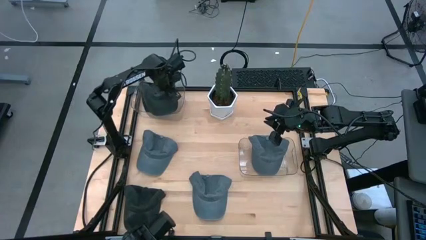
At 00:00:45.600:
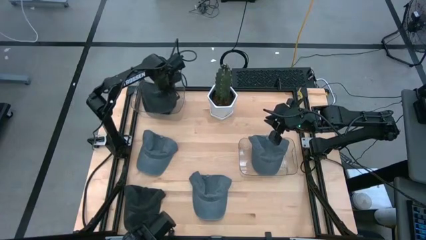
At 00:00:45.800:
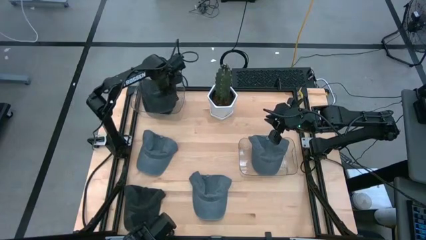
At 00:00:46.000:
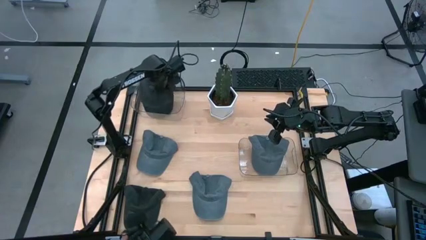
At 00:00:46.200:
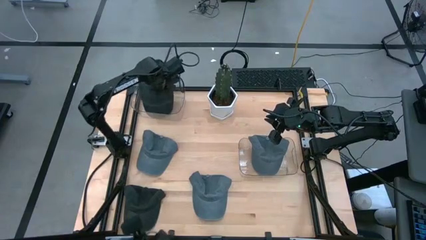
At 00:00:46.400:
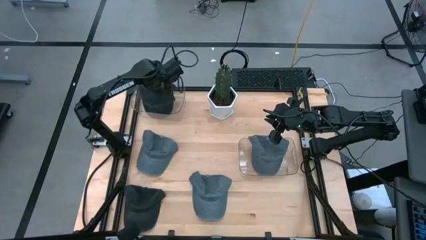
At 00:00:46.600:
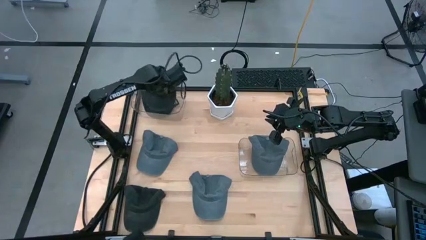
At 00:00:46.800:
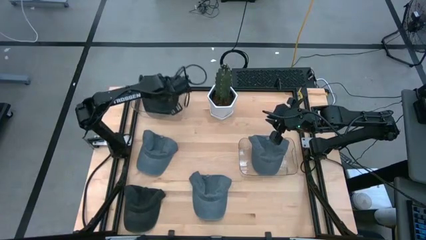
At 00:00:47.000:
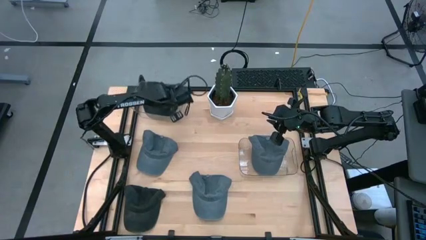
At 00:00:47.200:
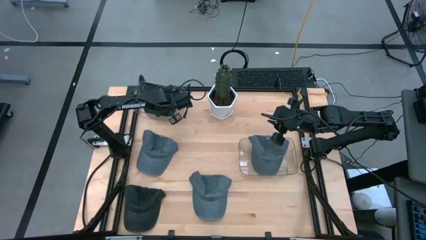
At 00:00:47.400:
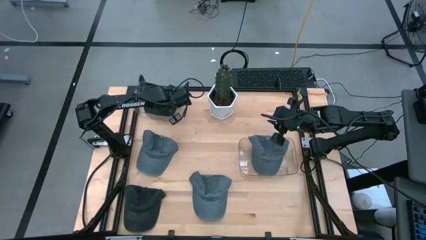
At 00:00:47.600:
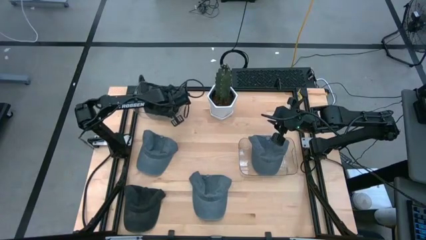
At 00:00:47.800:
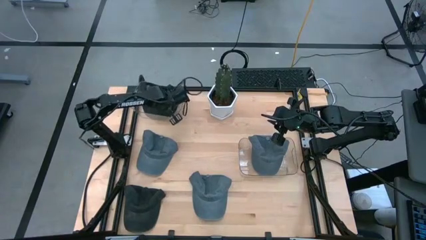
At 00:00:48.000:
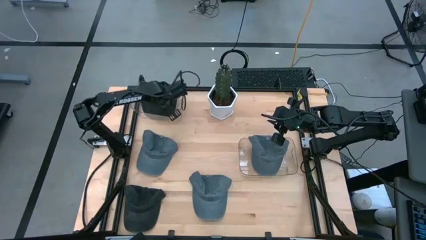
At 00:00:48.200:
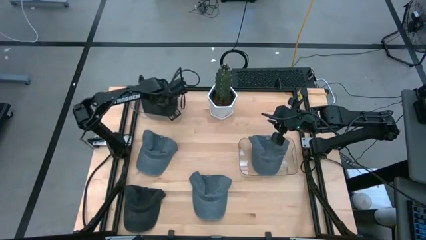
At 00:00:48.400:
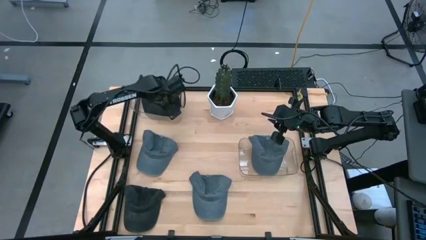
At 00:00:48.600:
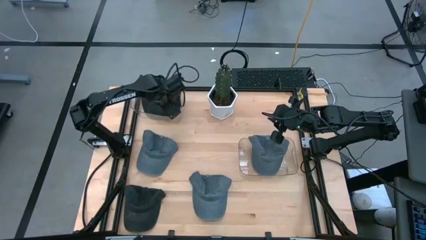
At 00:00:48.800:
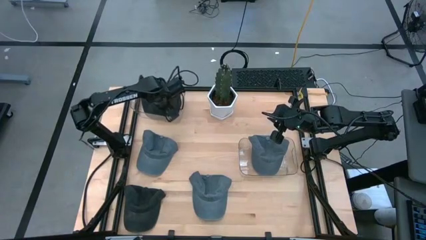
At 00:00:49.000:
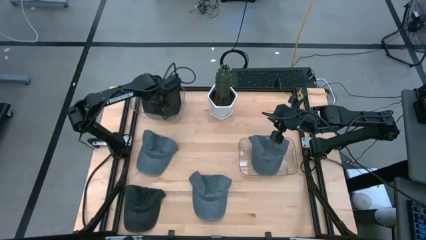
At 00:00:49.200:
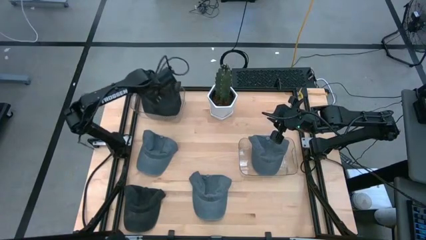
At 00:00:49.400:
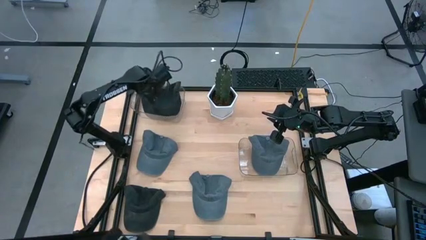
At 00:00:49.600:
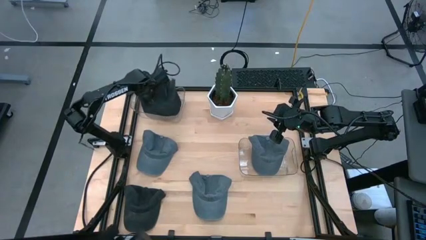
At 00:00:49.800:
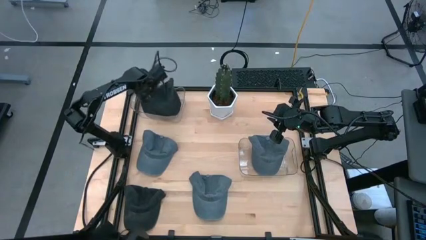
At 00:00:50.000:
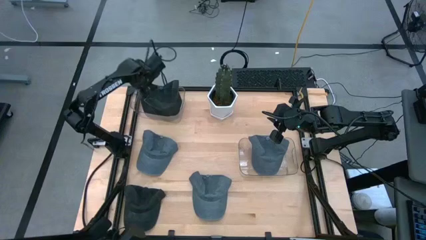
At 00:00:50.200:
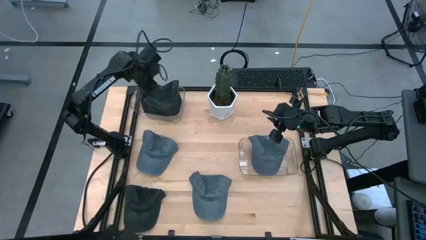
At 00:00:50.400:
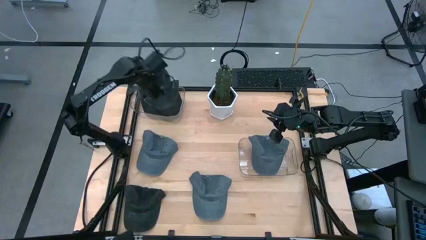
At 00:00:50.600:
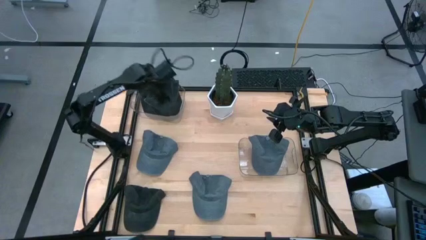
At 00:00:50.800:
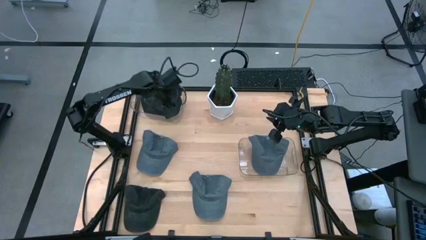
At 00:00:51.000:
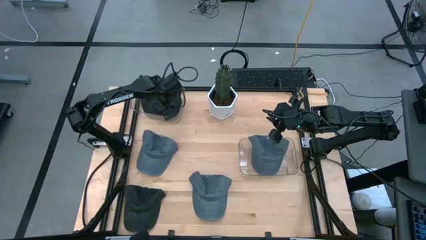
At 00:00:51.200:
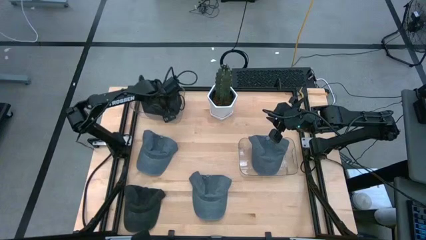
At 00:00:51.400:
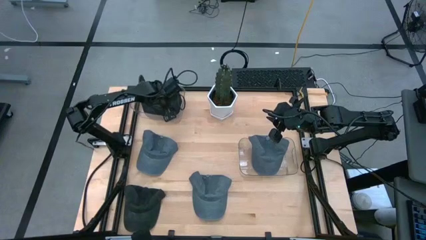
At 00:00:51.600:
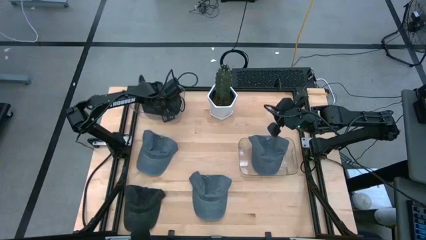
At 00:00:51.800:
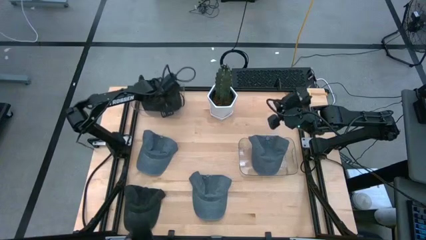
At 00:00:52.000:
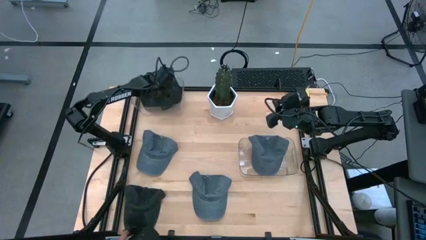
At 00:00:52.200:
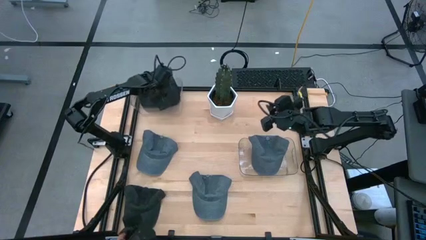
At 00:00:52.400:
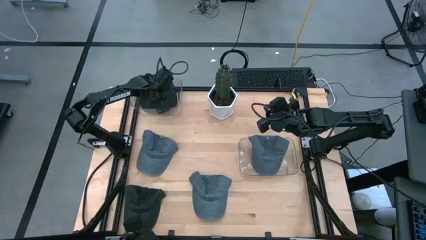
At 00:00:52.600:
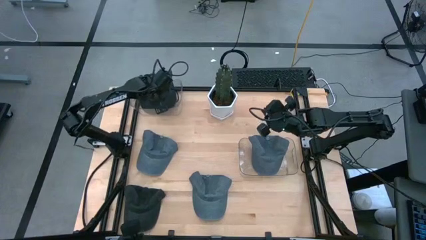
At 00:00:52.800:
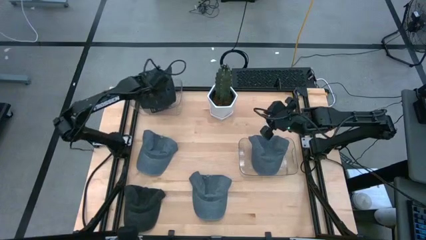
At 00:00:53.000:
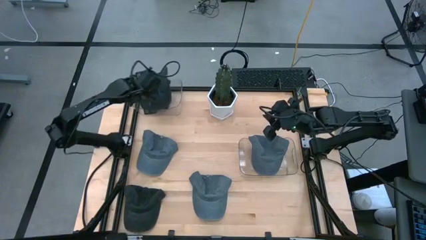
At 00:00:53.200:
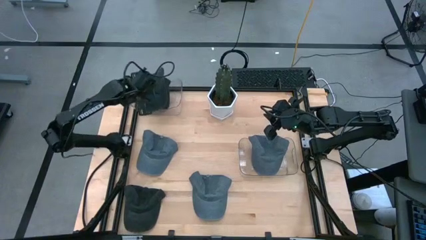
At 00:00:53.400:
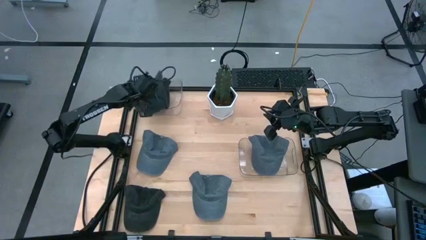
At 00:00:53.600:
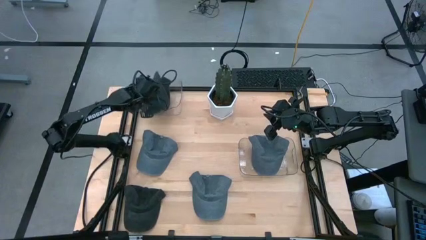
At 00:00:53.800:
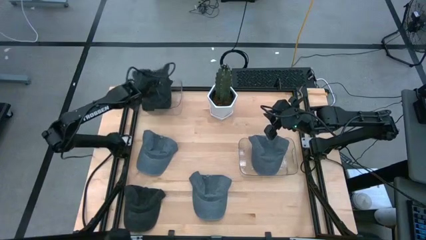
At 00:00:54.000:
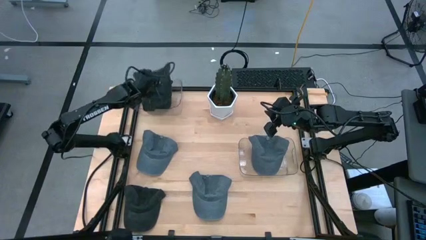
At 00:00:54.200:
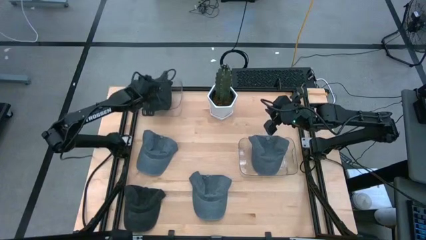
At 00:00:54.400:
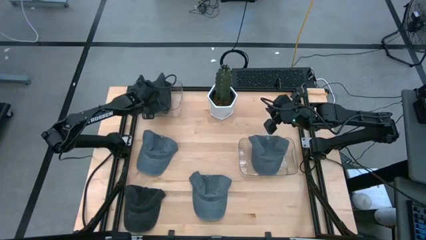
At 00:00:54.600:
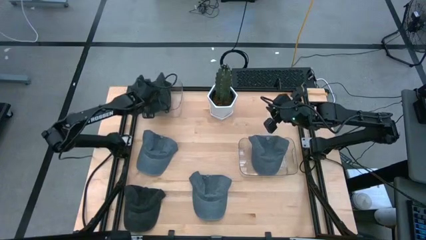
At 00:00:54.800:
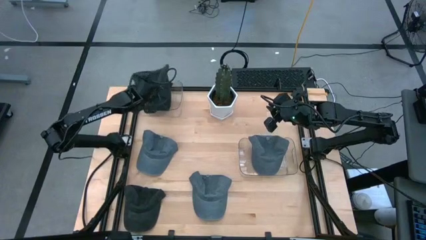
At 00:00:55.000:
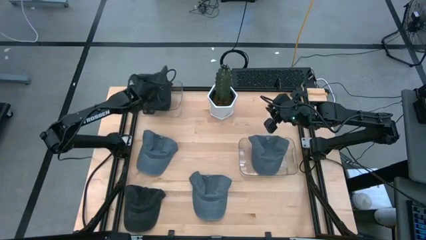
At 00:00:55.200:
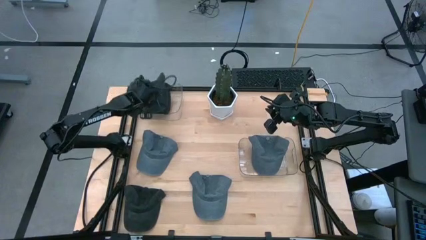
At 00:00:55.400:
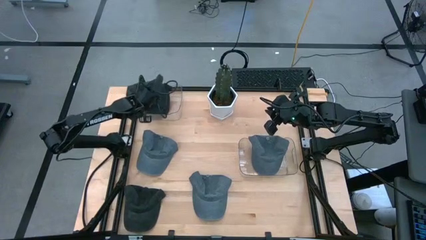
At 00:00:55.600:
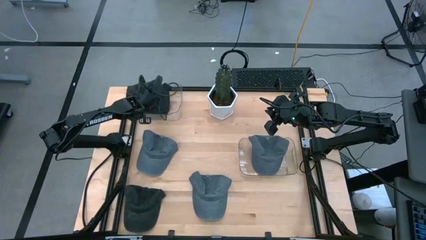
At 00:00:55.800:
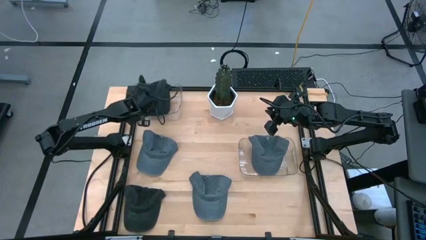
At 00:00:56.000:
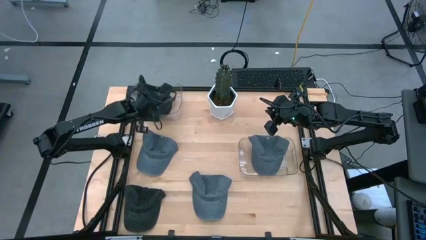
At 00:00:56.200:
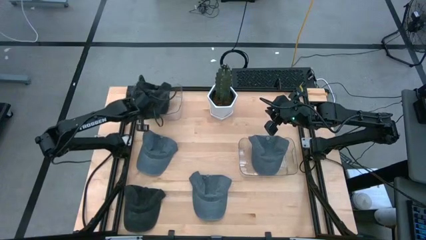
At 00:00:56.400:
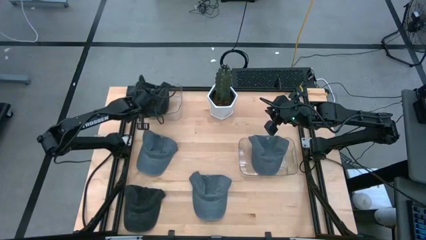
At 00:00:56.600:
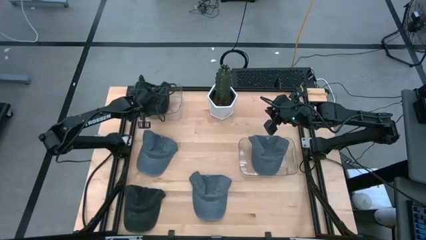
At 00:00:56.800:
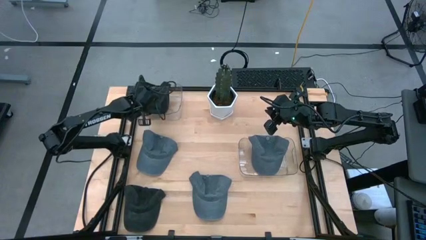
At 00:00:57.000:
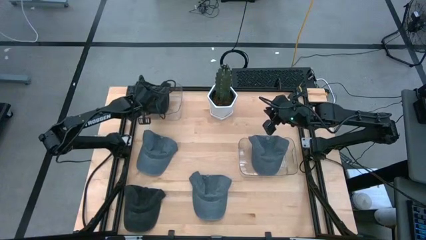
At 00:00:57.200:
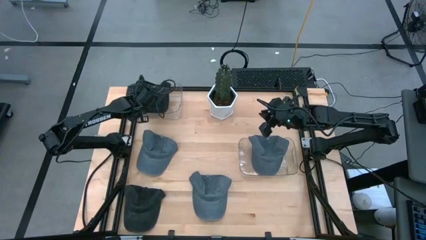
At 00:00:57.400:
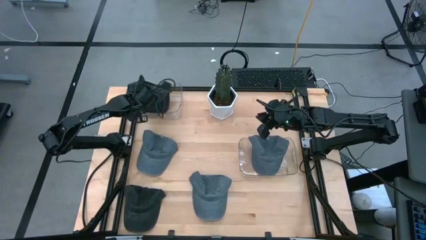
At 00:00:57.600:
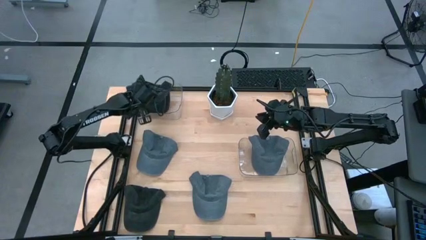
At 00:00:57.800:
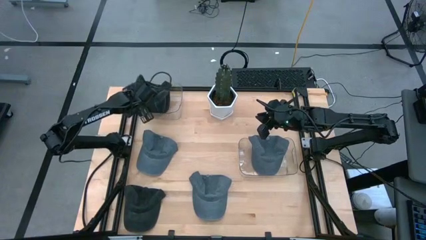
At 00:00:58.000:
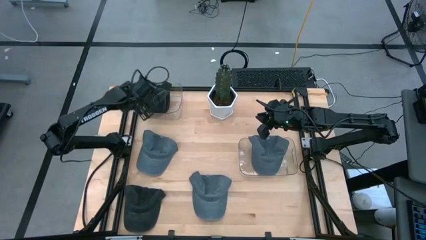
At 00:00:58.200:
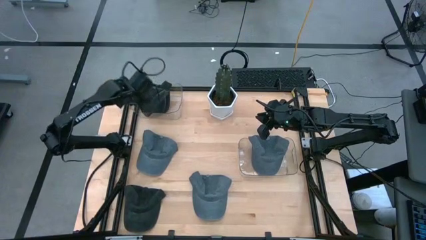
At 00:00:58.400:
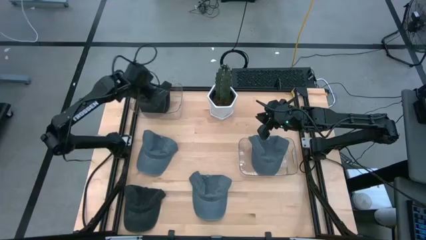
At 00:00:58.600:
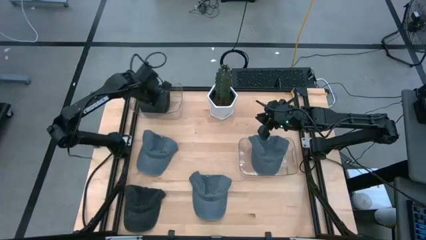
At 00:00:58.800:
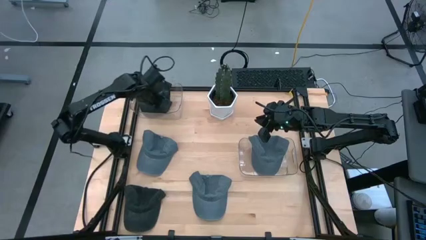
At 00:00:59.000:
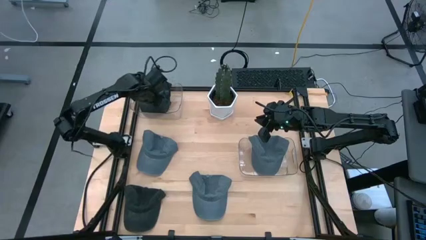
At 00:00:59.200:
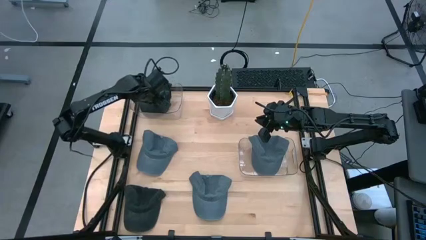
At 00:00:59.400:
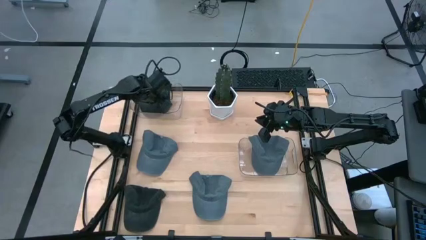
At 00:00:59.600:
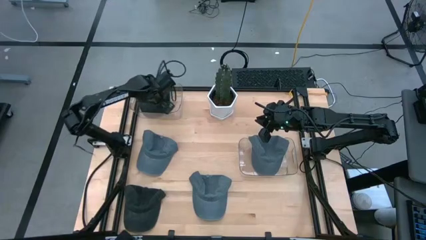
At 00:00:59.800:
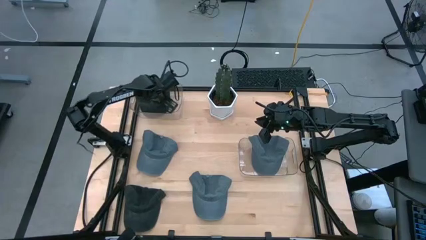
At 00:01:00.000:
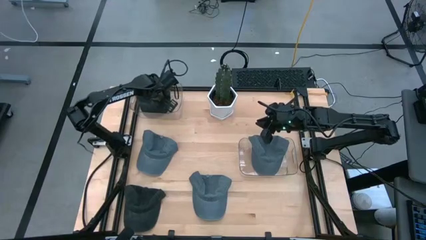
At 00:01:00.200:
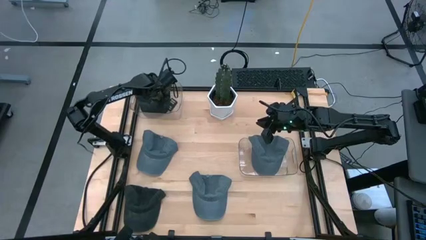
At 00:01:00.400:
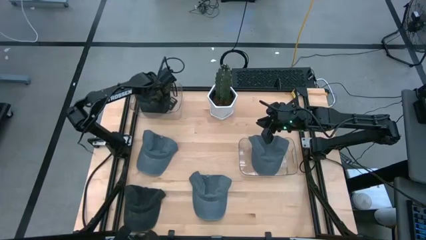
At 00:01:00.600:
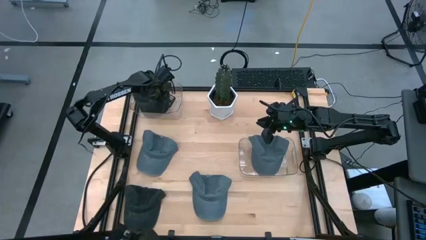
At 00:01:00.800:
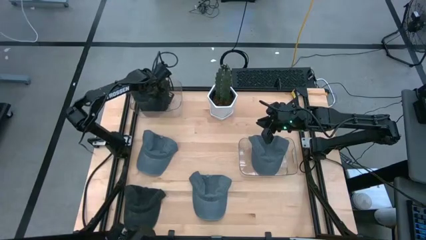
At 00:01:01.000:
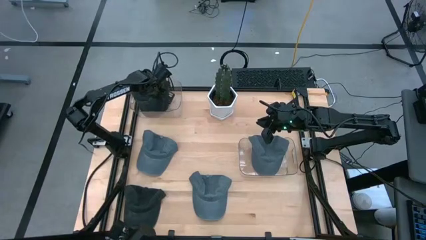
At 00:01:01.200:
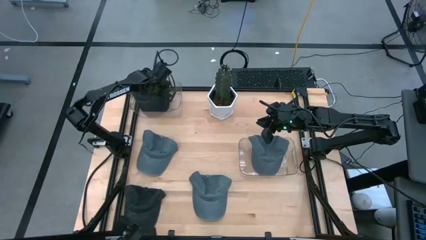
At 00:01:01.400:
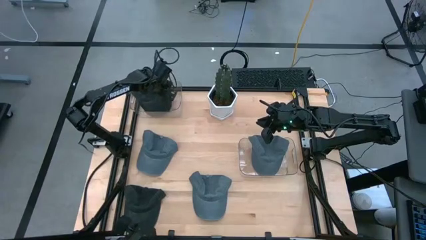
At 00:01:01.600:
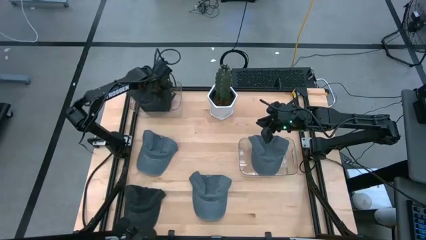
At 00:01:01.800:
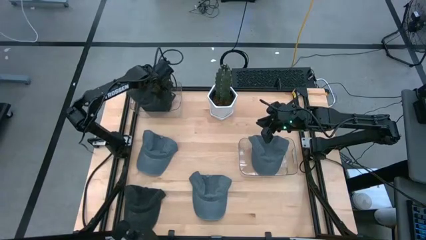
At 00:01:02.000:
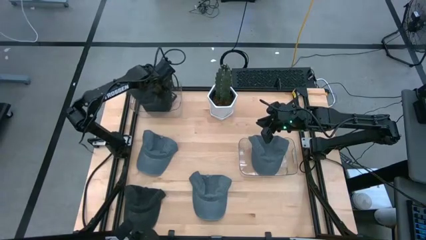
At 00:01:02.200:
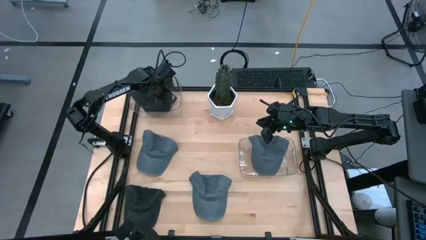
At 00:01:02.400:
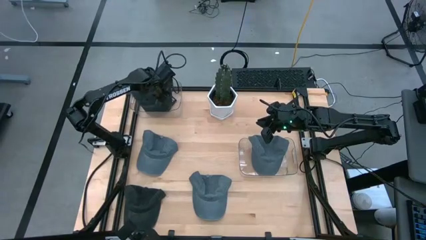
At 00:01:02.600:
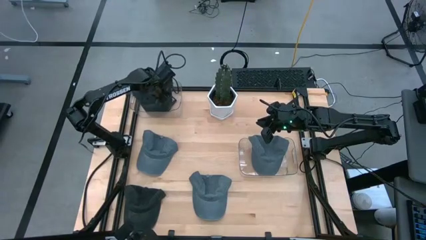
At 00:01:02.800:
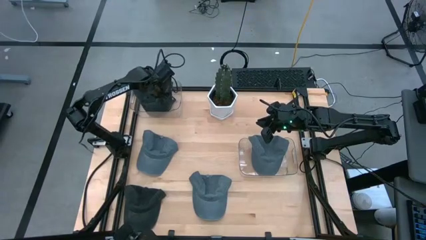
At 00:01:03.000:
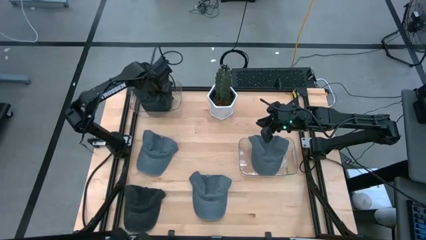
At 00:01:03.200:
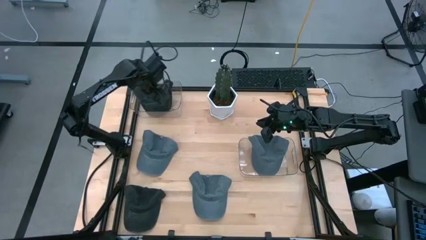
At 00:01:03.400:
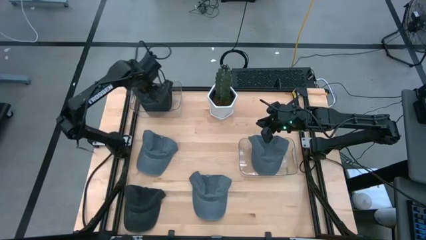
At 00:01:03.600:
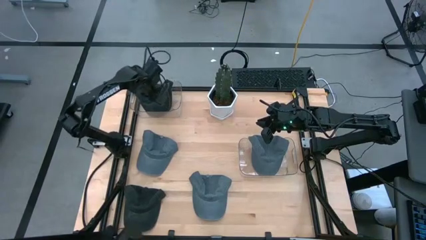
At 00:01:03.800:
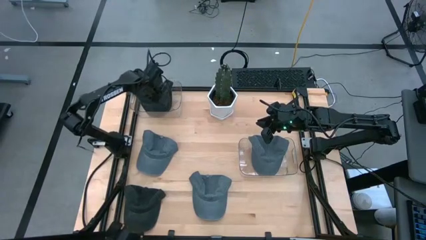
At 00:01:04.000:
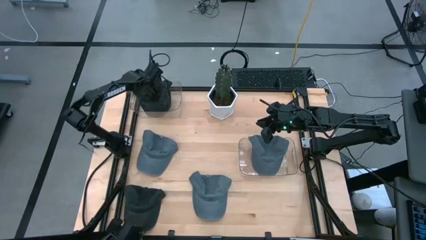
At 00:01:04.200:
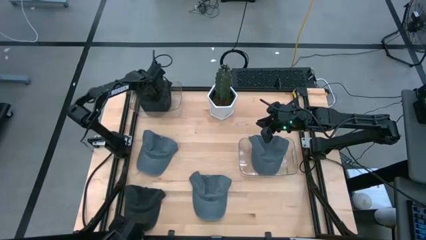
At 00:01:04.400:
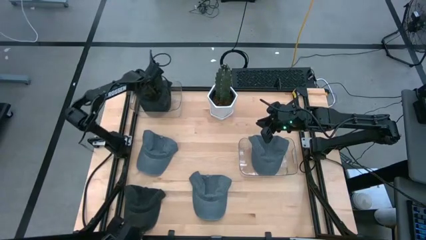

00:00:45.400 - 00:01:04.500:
Task: Pick & Place hat
Put the right black cap into the top transparent bin
